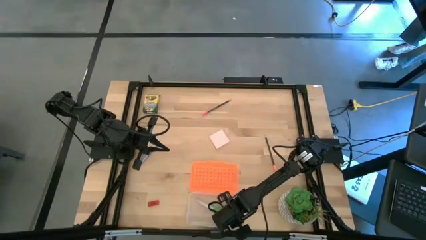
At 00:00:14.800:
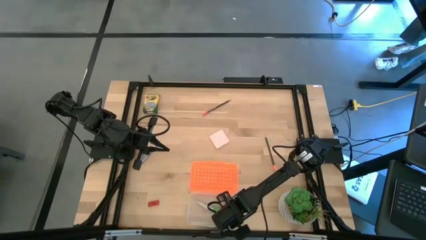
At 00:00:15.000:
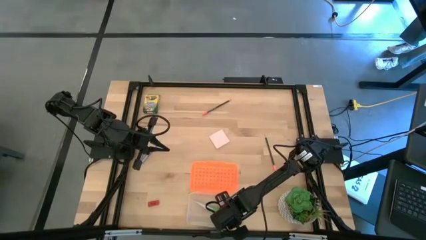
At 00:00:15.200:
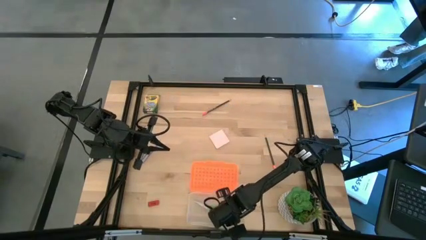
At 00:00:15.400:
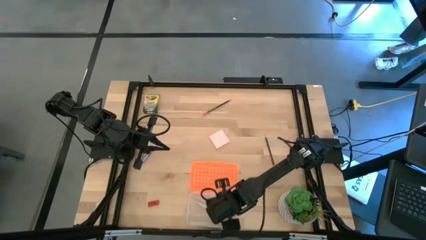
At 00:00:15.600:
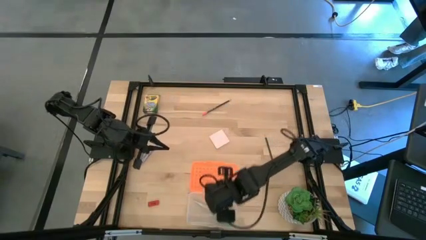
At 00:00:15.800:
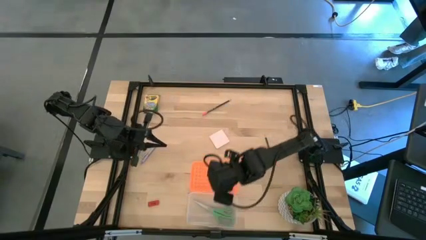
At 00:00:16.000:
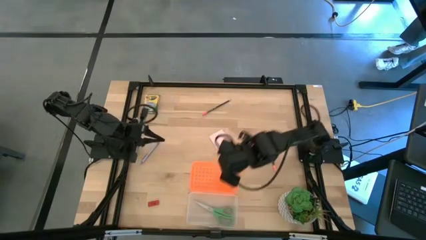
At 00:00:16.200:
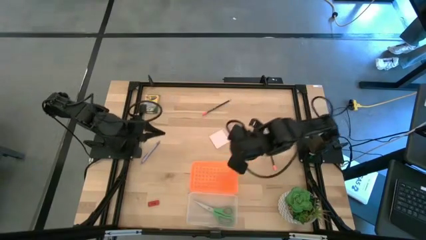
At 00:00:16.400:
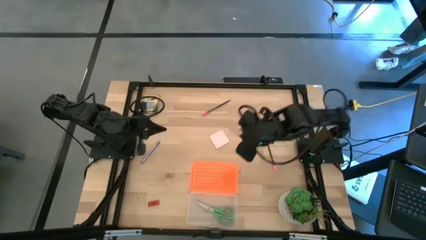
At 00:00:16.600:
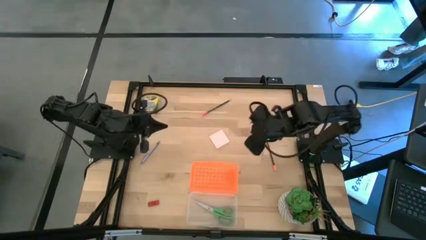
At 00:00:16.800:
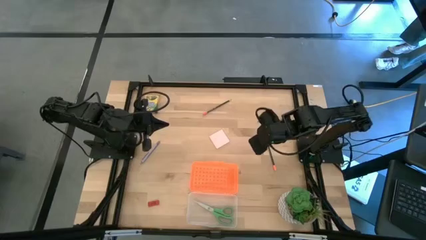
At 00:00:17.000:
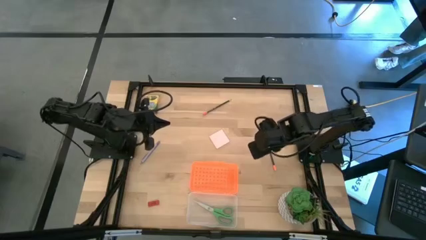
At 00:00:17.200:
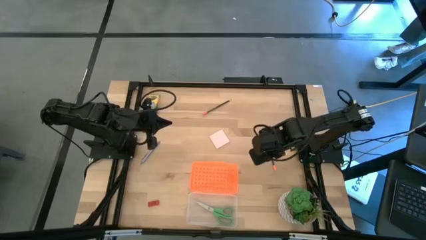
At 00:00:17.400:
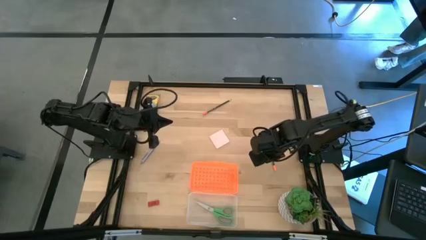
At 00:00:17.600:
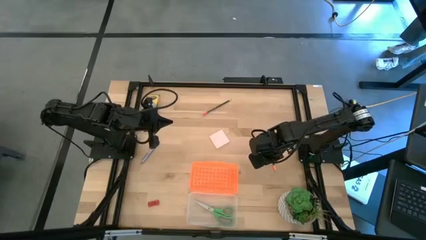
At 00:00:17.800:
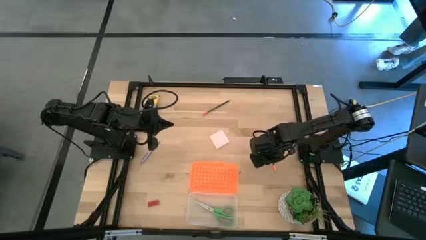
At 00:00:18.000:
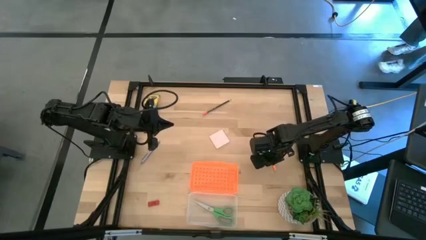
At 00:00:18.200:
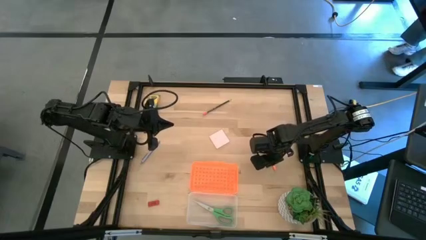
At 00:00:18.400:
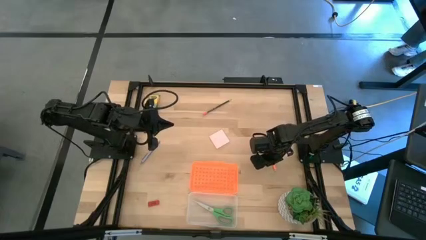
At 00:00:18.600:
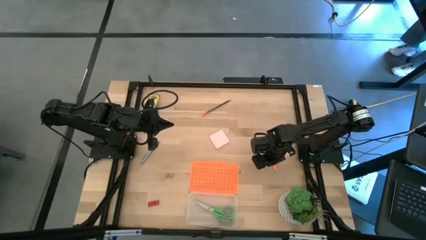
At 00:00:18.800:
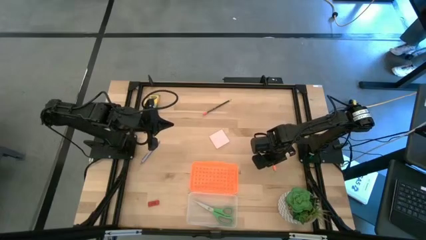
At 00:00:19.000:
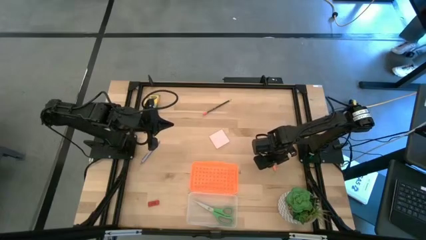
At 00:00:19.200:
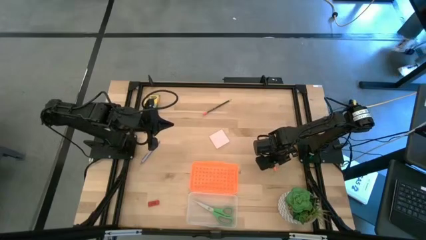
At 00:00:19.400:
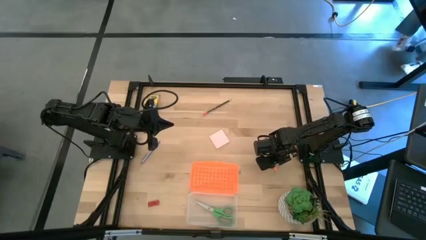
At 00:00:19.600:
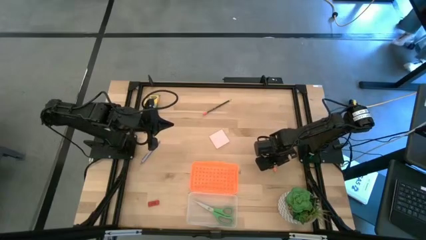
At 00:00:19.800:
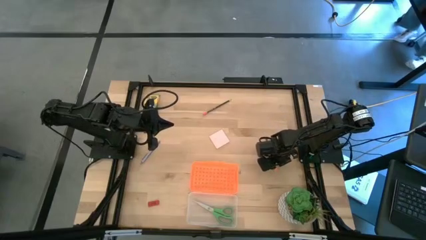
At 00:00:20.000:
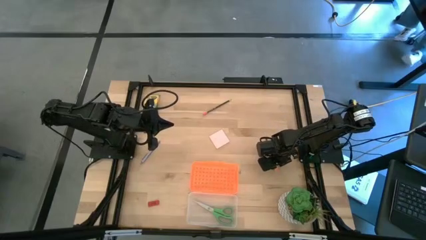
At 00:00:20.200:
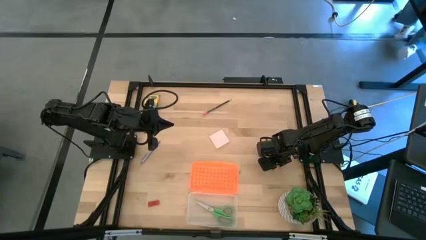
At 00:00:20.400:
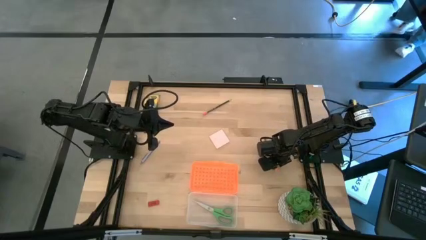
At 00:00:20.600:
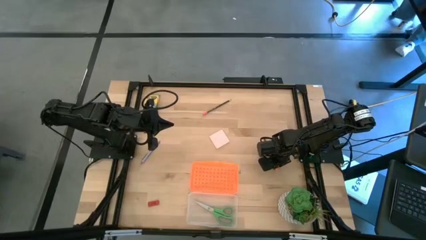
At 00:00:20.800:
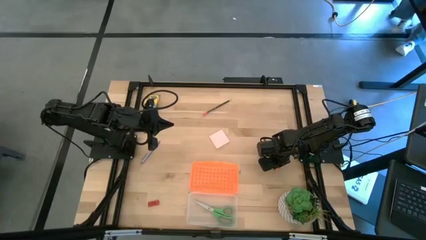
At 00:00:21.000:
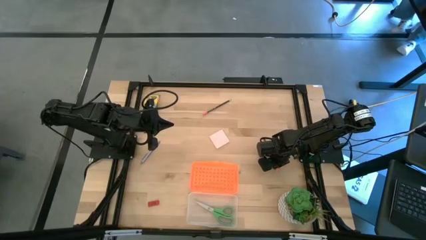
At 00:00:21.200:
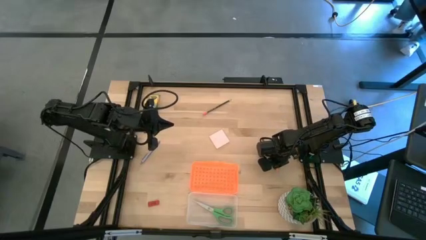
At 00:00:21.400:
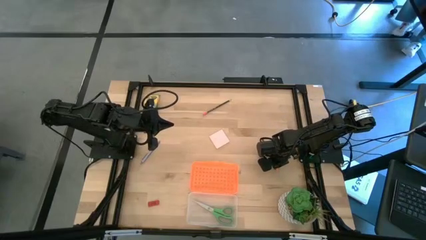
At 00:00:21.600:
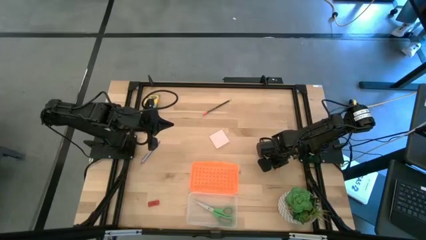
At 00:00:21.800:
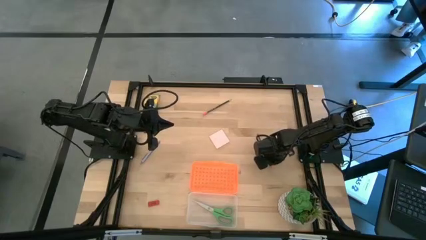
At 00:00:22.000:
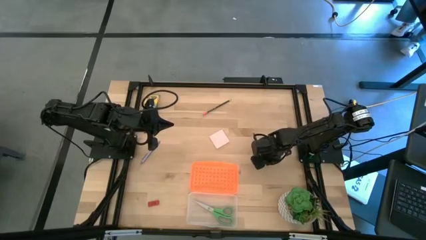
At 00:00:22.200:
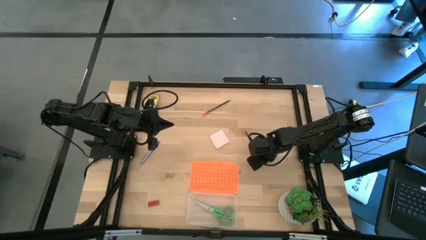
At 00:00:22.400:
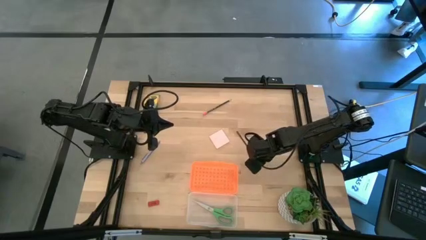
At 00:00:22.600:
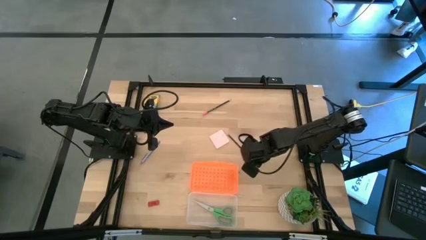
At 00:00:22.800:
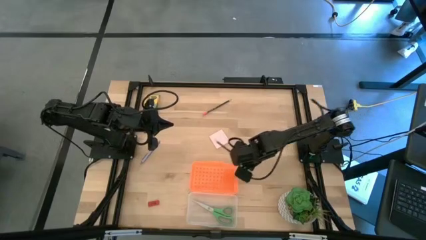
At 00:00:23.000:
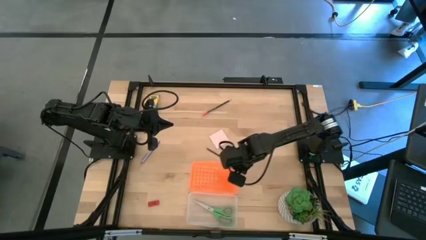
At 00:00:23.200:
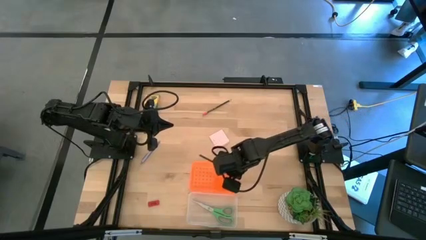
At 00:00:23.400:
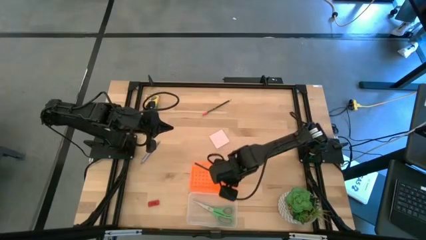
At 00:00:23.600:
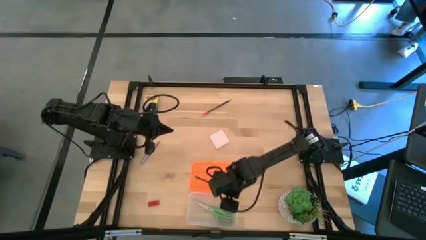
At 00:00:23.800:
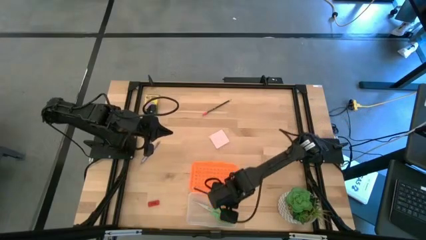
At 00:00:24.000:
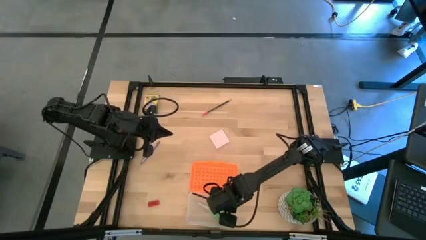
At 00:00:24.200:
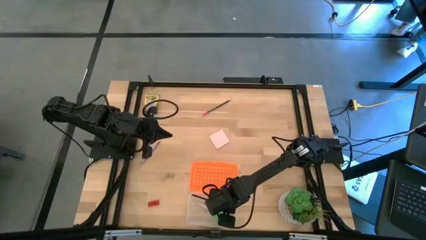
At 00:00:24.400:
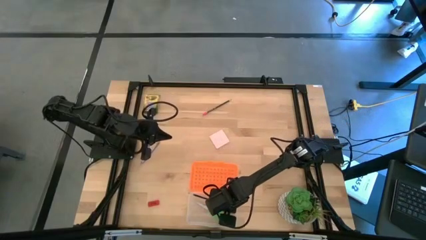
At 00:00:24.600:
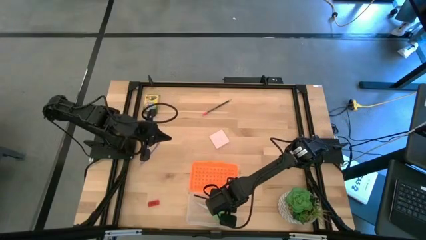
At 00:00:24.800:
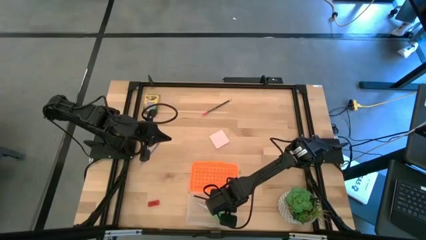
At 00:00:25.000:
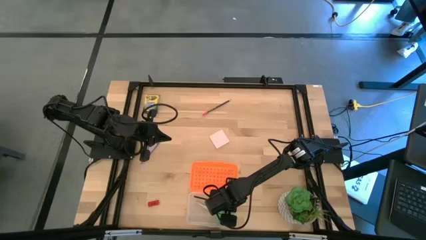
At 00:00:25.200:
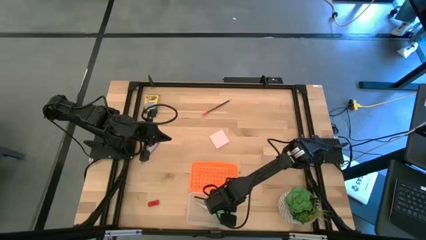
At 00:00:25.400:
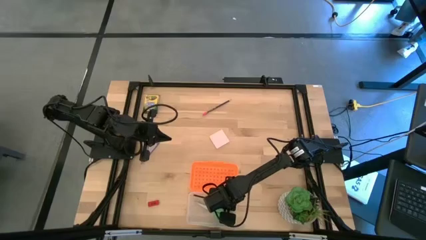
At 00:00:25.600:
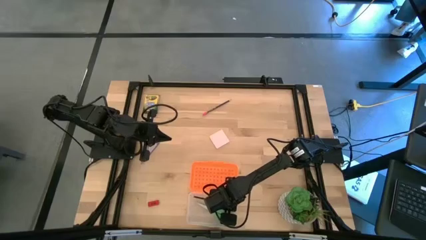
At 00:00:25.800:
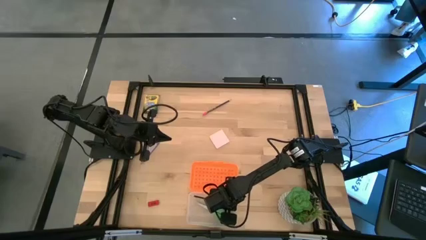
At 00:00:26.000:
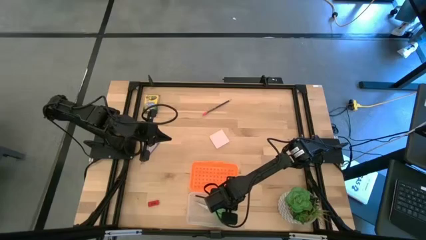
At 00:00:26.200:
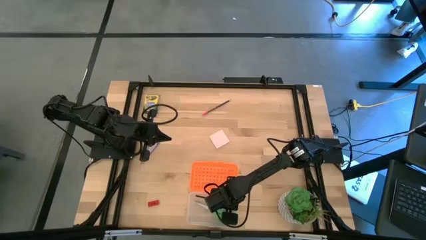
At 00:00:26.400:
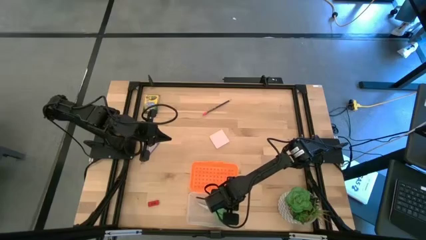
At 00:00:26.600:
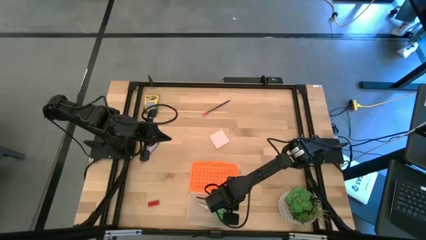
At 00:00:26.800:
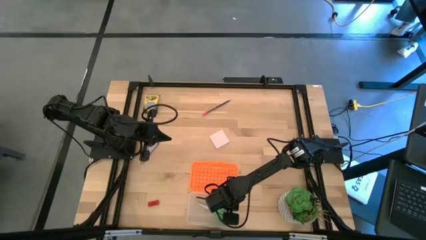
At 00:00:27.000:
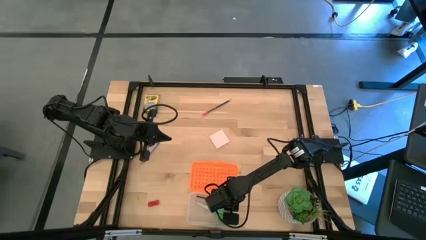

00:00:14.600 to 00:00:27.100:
Task: Pack school essentials
Put the dark blue pencil into the orange supply box
